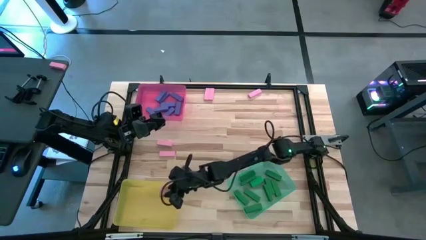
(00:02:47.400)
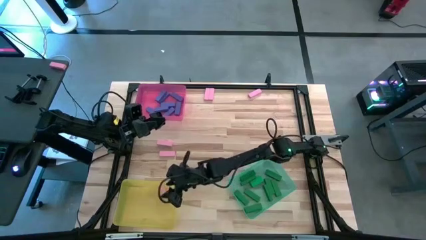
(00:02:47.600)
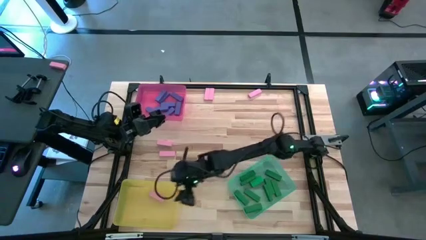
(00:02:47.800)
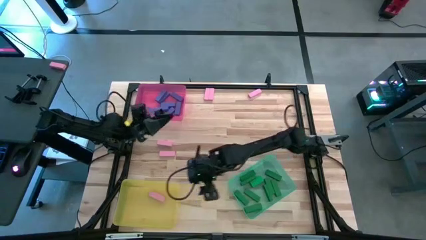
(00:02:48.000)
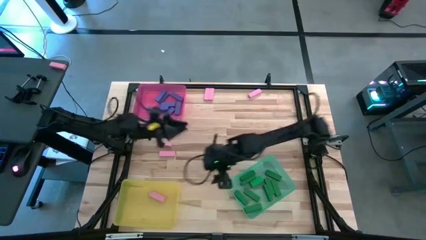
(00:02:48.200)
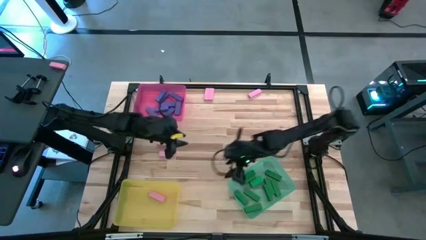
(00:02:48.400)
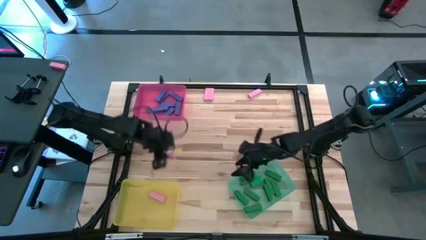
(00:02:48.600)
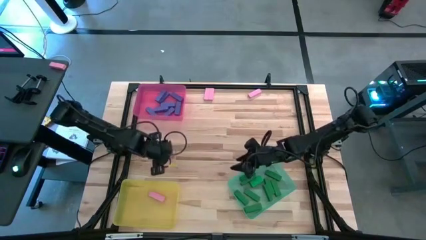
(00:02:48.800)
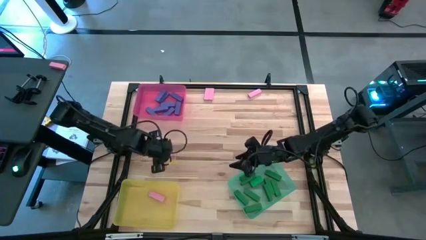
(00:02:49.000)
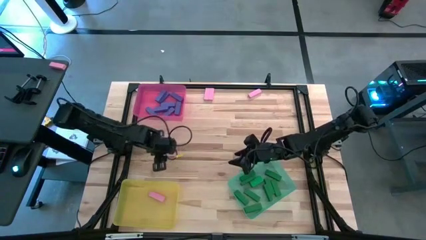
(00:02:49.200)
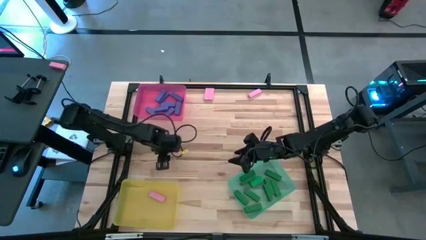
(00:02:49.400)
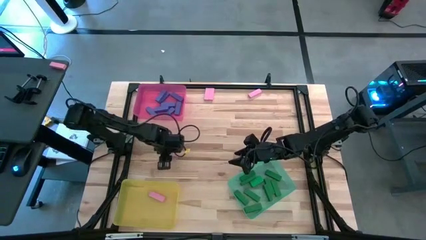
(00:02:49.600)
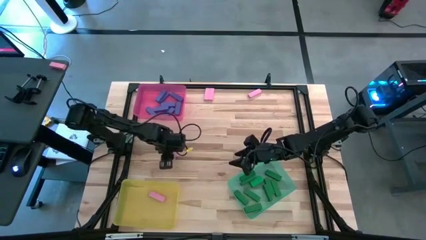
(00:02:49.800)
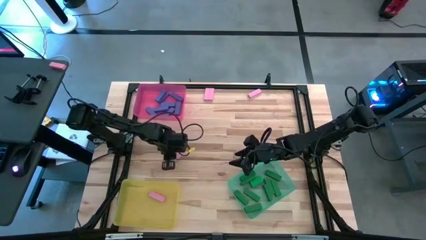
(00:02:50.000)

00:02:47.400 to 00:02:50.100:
Task: Sort blocks
Put the pink block into the yellow bin

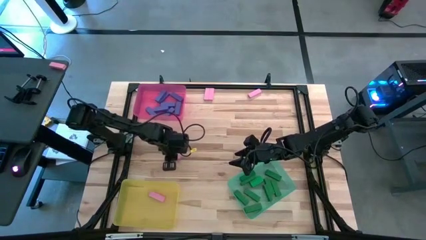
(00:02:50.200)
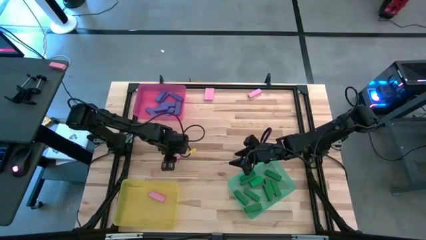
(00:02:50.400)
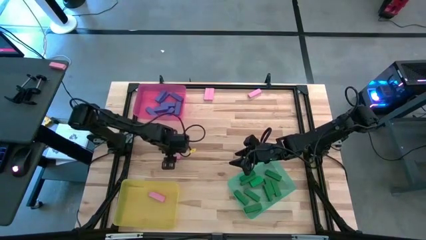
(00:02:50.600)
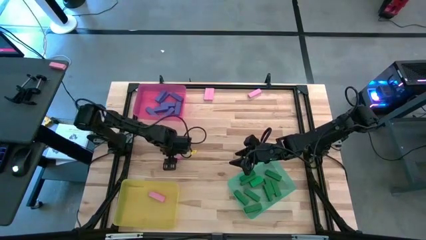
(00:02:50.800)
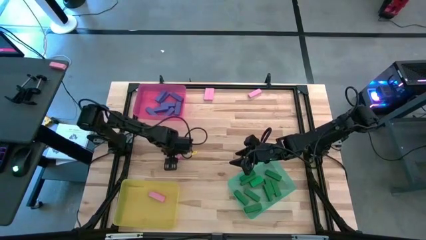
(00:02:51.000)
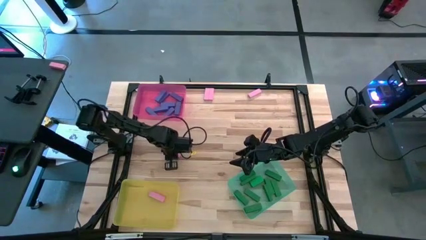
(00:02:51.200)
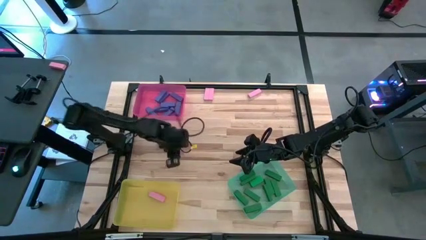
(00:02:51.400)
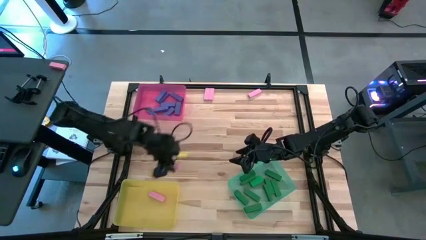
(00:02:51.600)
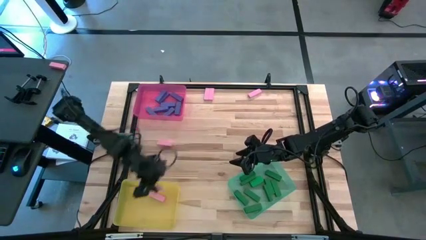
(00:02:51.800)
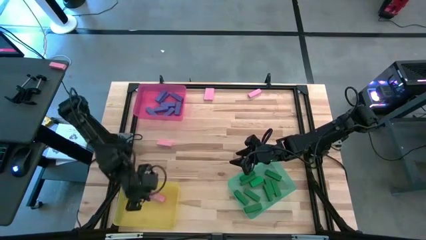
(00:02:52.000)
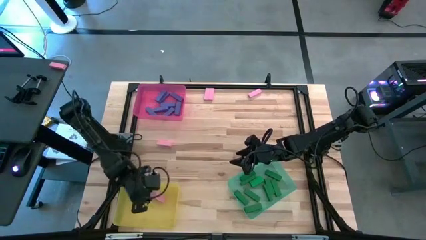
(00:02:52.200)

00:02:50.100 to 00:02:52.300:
Put the pink block into the yellow bin

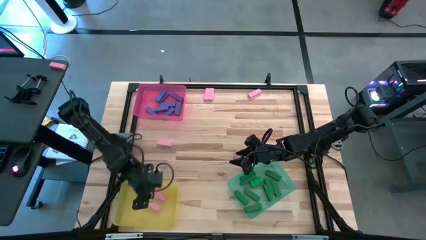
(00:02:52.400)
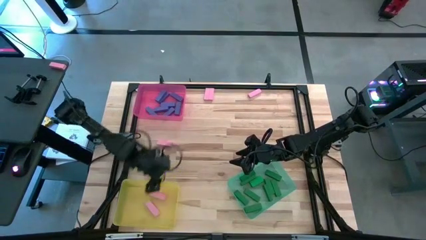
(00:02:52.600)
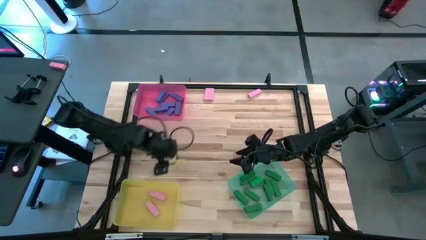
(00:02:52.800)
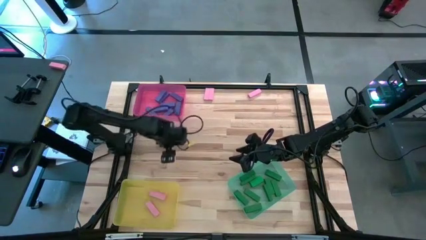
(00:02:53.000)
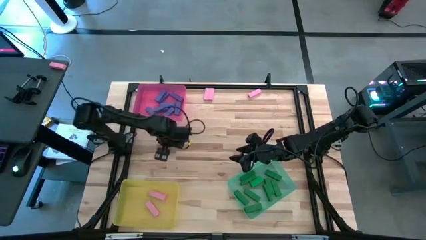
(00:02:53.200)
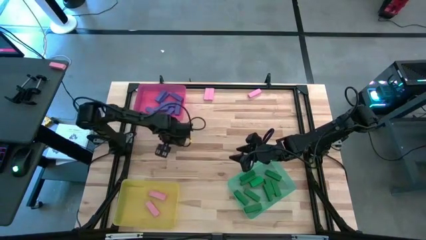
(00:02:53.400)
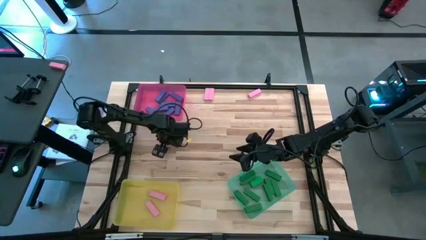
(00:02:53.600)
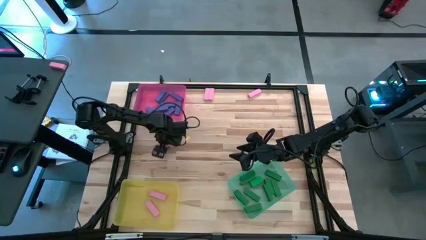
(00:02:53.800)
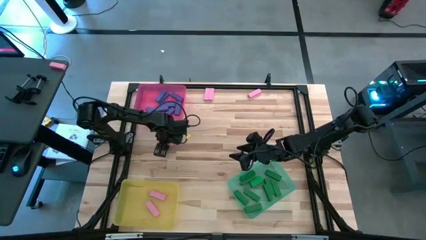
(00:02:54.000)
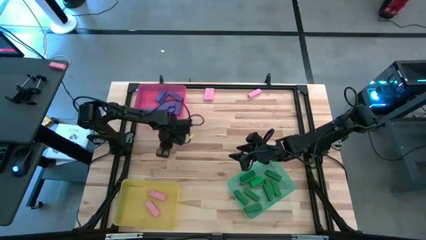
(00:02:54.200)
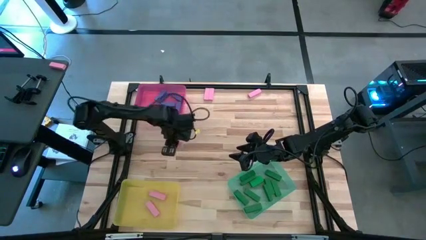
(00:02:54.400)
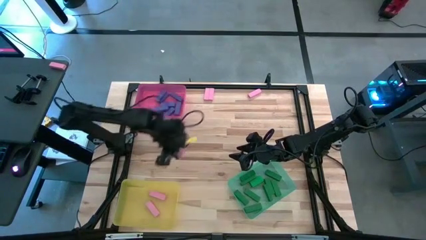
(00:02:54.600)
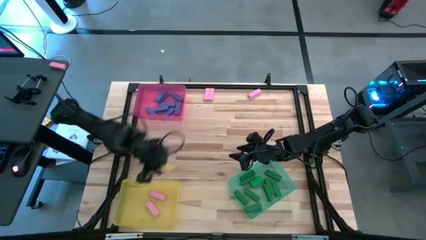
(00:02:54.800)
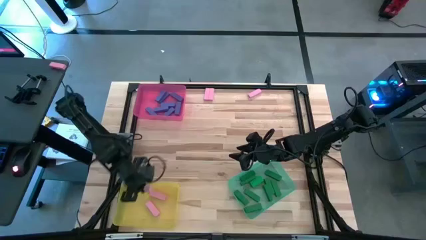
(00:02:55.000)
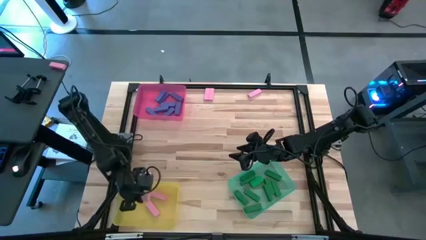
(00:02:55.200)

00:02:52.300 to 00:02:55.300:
Put the pink block into the yellow bin

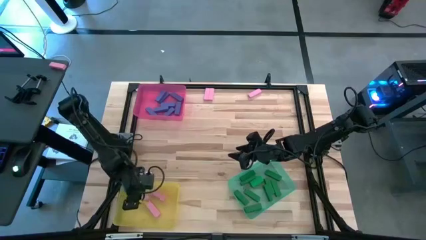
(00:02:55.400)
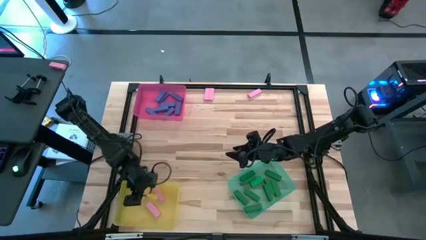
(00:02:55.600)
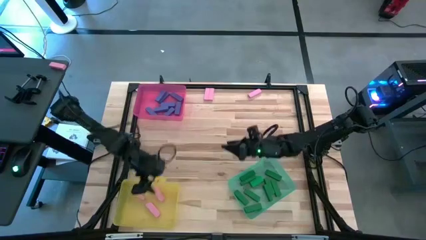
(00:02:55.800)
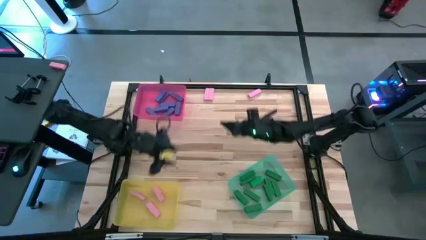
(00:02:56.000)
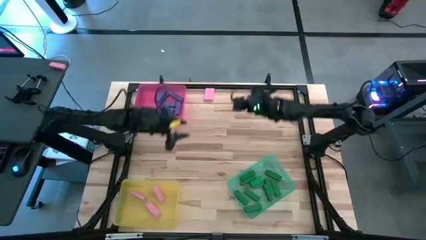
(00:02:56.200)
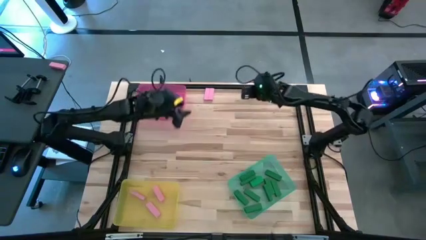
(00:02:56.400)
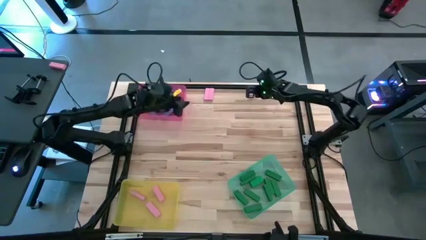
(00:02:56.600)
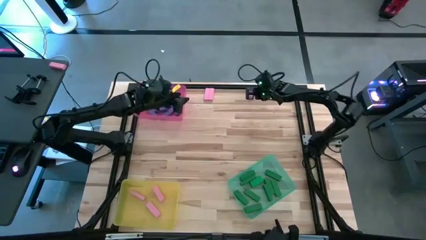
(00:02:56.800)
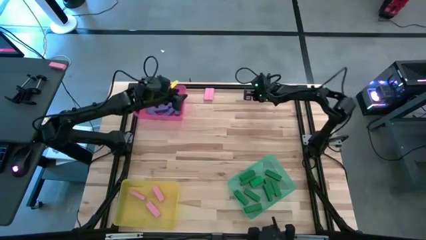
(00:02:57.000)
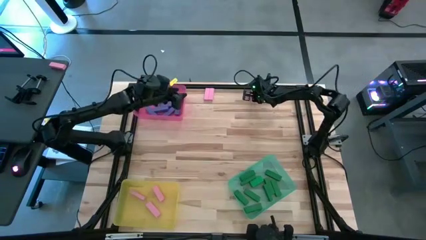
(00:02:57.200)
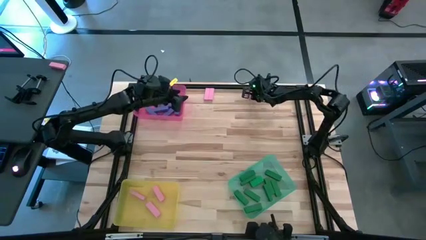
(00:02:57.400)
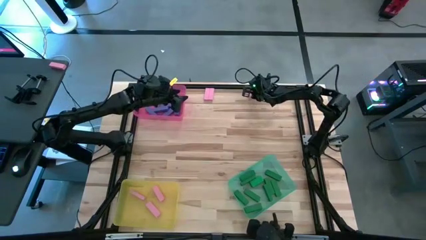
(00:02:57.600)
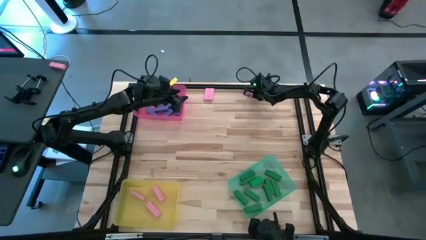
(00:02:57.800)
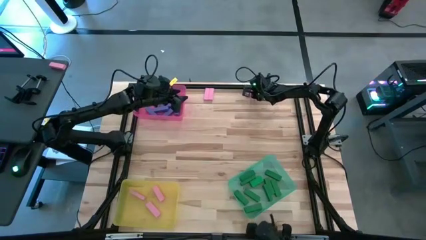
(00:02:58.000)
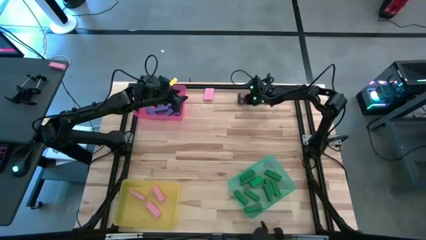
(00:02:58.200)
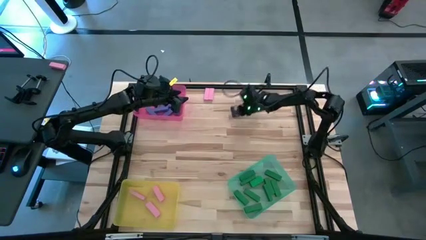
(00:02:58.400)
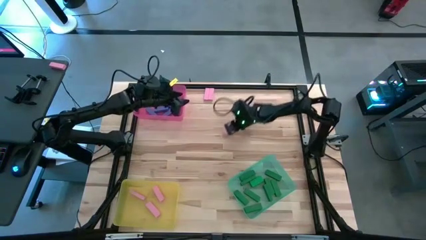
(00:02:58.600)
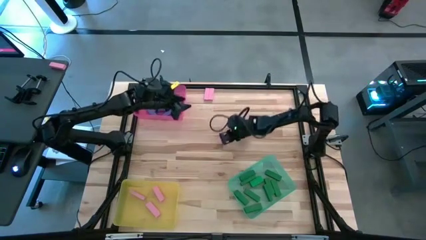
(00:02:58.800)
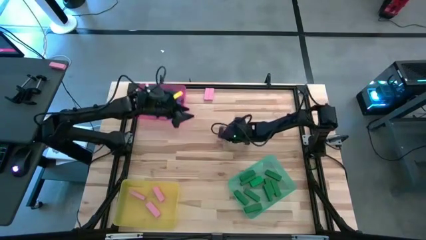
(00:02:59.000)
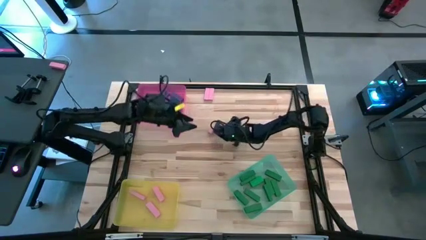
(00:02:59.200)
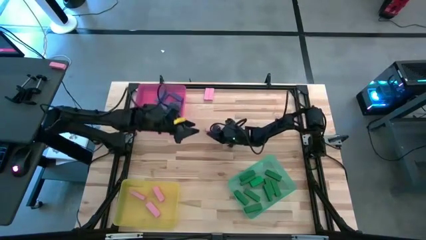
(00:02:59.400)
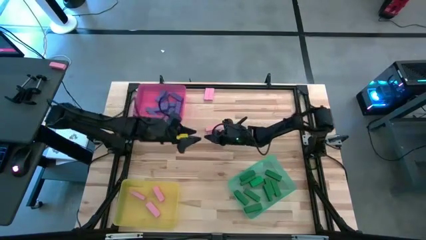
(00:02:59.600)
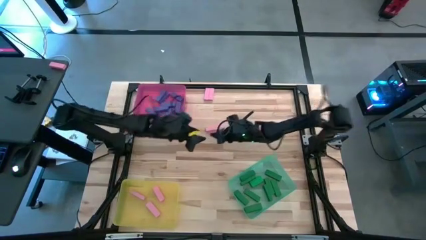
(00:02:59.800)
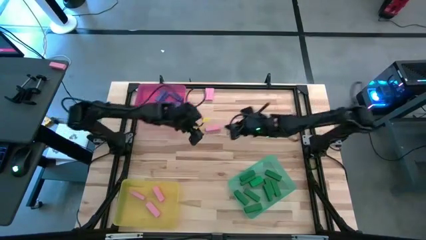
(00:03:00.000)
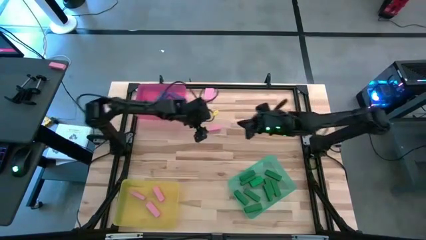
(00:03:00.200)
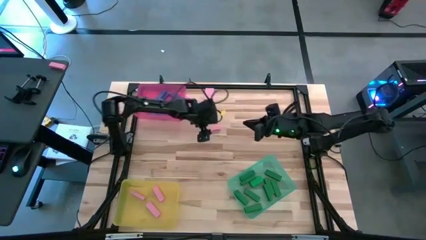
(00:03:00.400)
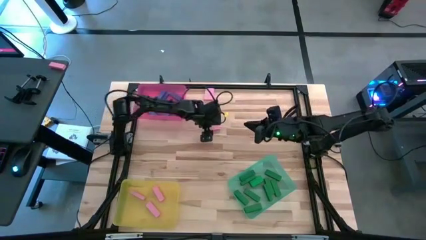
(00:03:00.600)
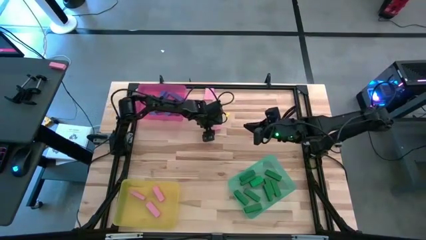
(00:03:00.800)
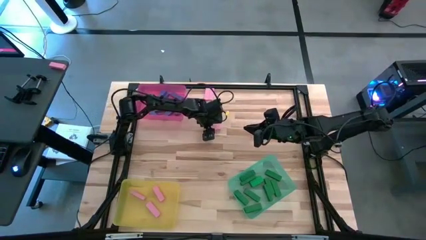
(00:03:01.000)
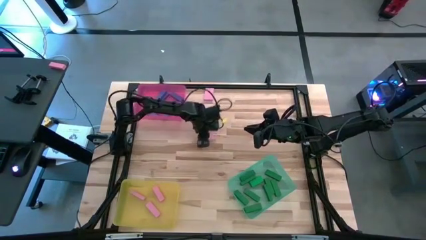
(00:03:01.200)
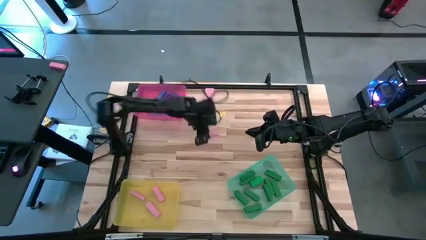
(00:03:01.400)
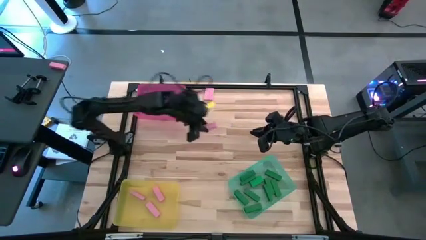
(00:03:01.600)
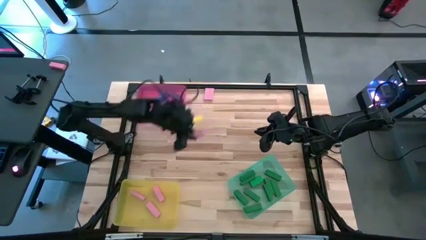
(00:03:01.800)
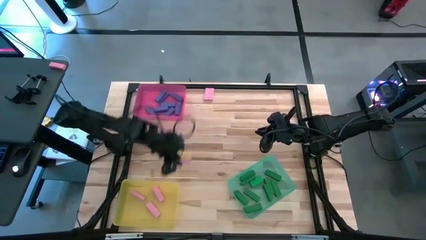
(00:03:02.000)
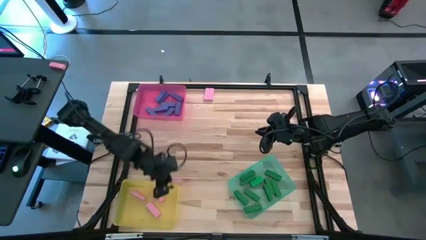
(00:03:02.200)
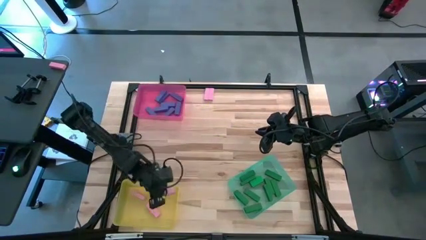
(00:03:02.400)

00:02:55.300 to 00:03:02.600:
Put the pink block into the yellow bin
